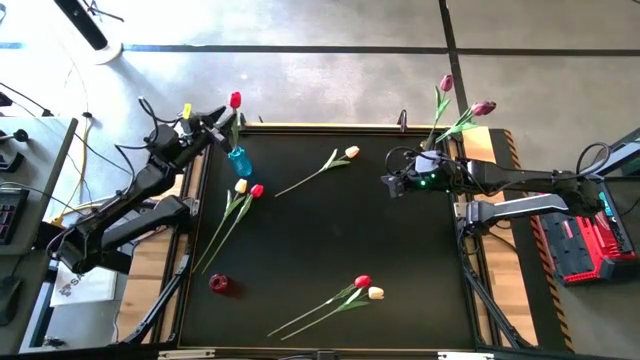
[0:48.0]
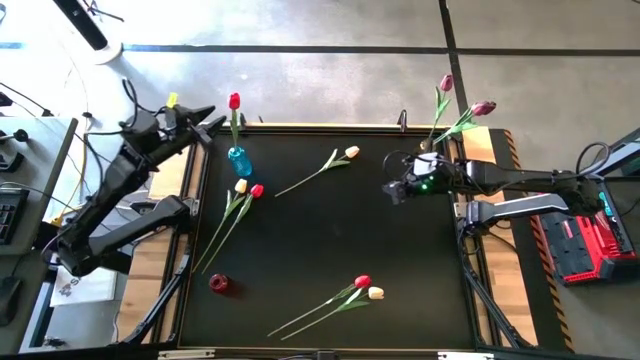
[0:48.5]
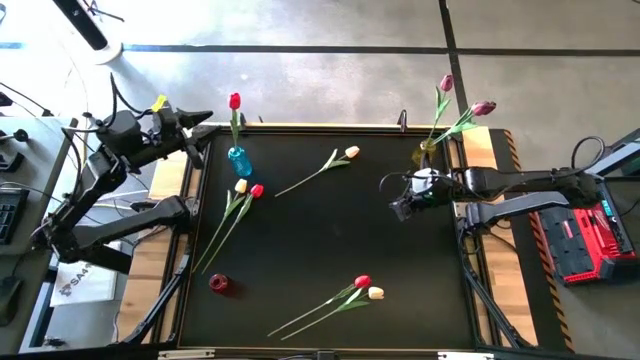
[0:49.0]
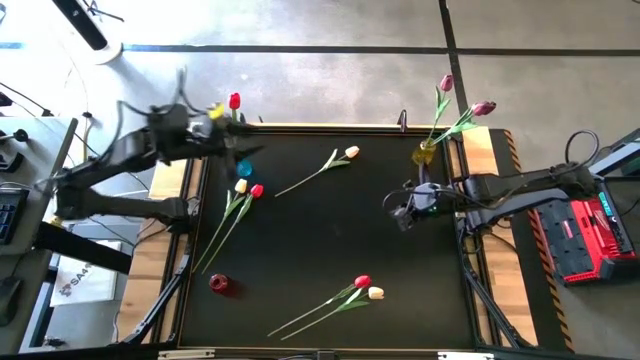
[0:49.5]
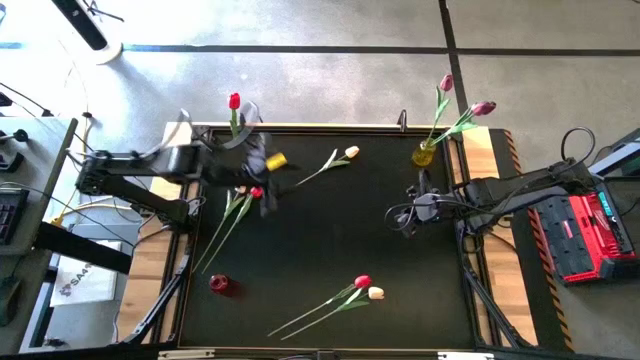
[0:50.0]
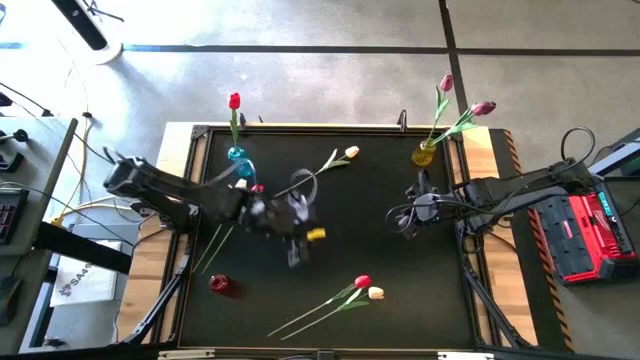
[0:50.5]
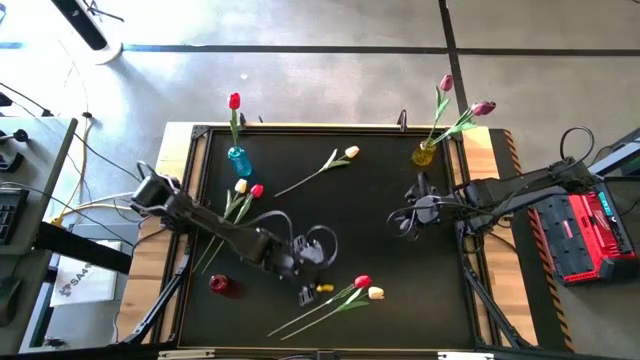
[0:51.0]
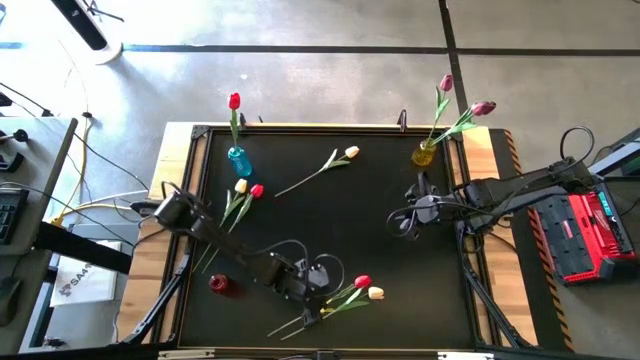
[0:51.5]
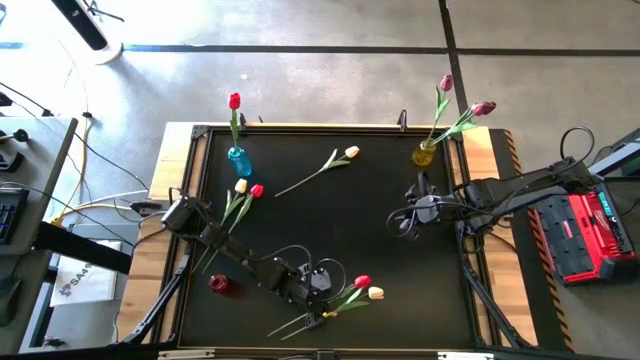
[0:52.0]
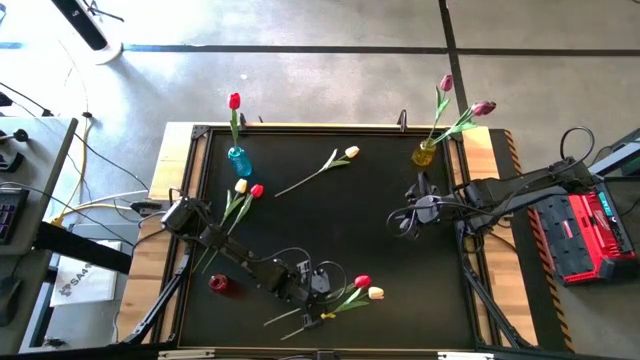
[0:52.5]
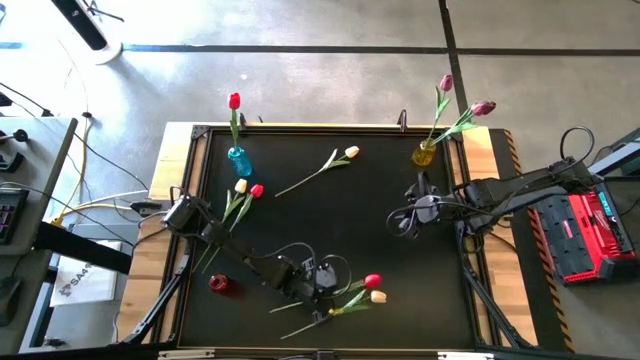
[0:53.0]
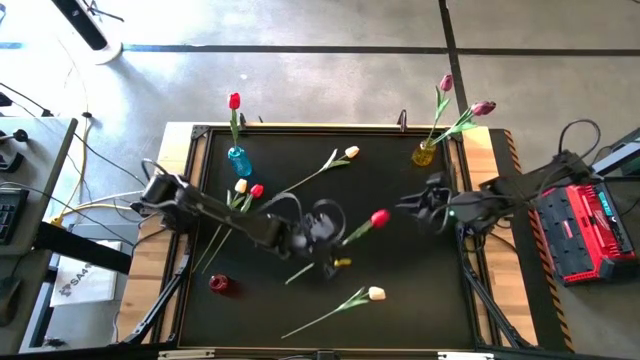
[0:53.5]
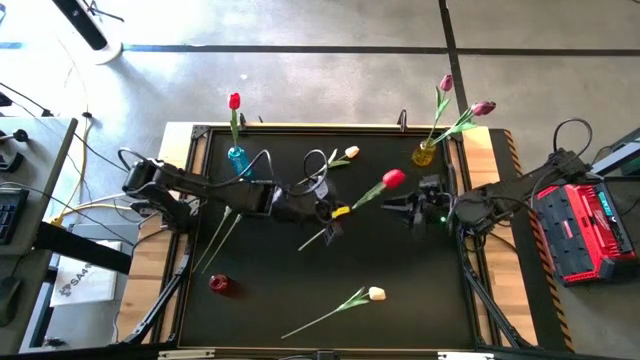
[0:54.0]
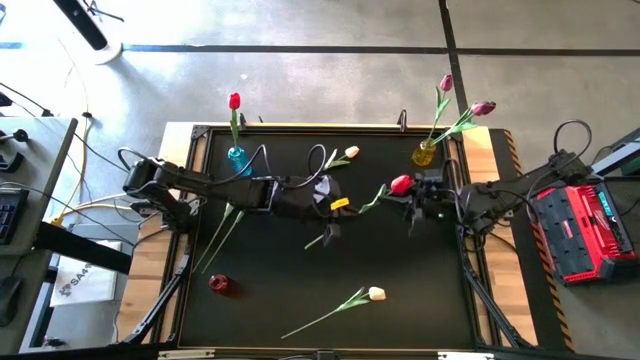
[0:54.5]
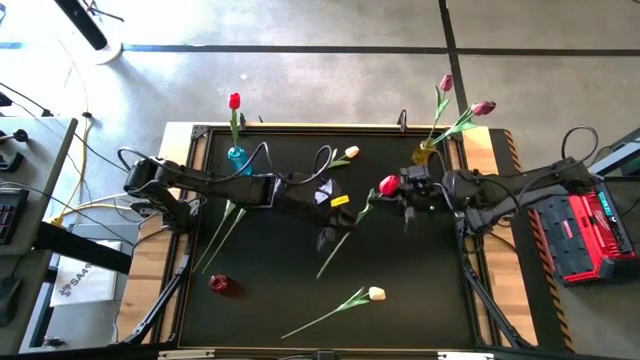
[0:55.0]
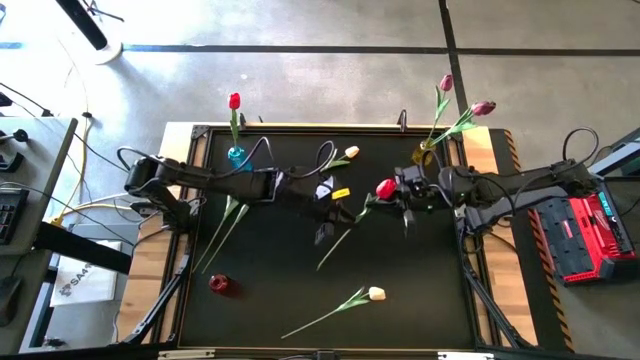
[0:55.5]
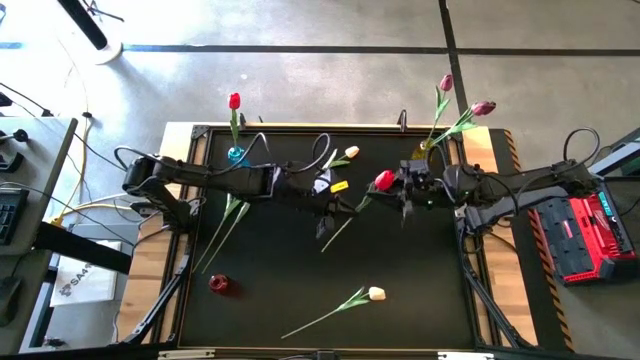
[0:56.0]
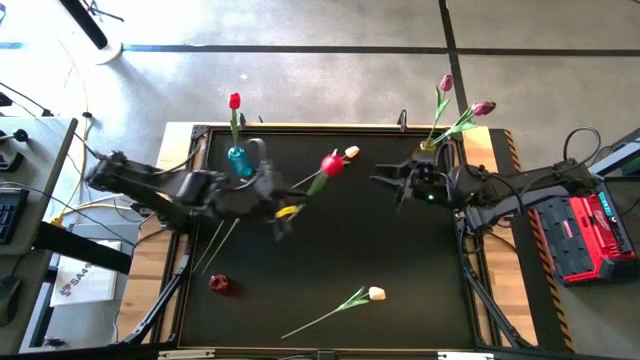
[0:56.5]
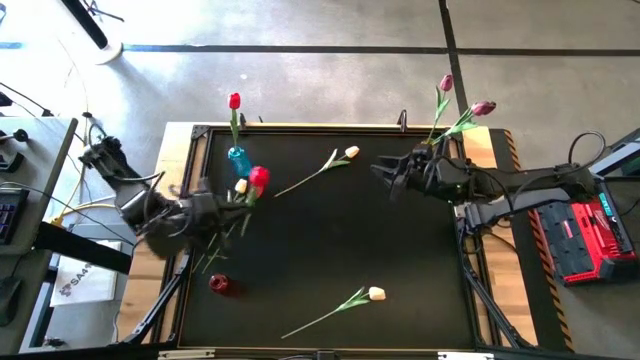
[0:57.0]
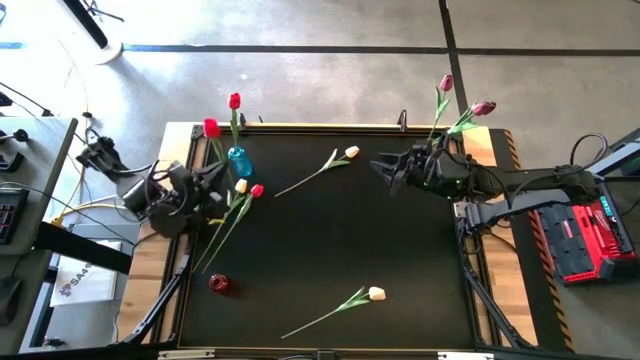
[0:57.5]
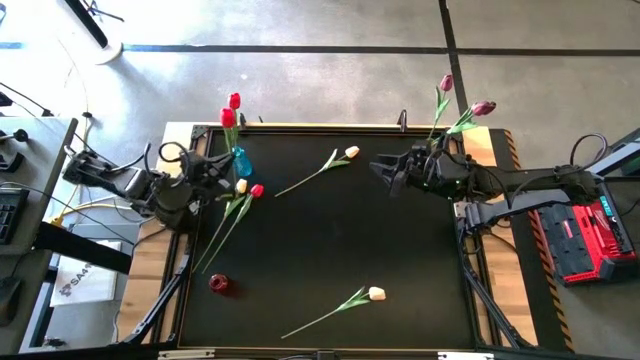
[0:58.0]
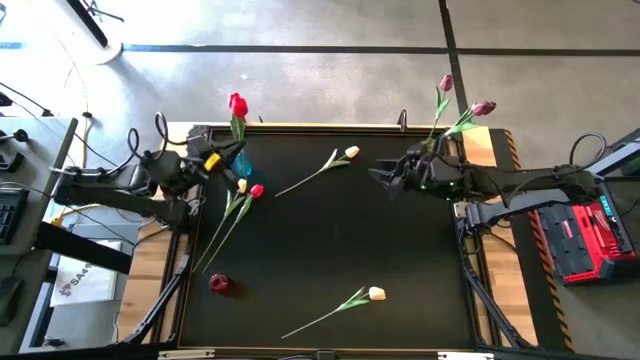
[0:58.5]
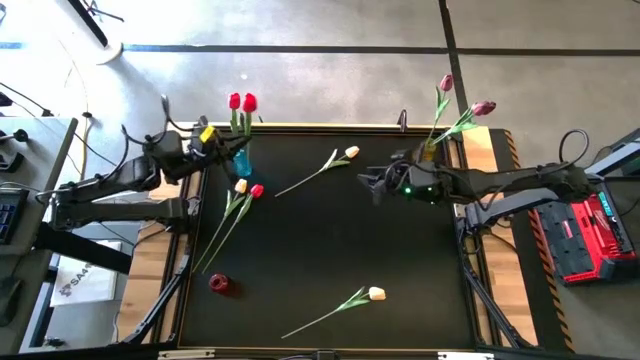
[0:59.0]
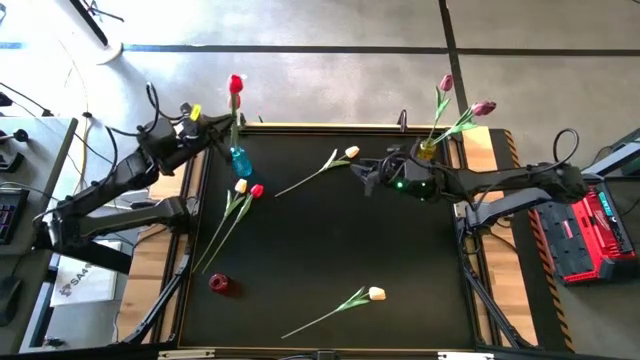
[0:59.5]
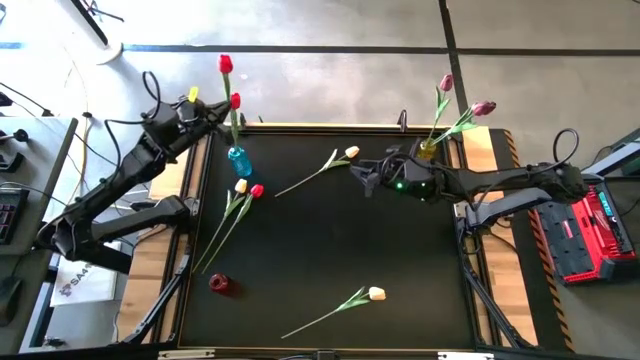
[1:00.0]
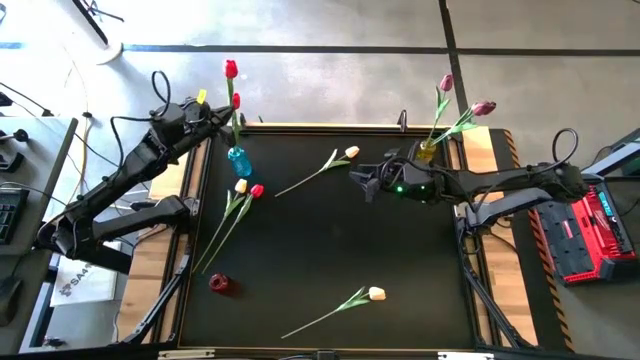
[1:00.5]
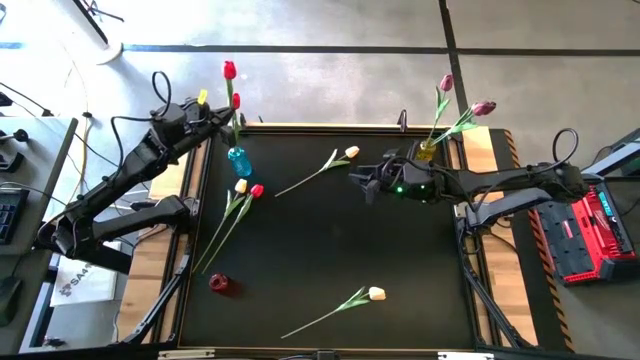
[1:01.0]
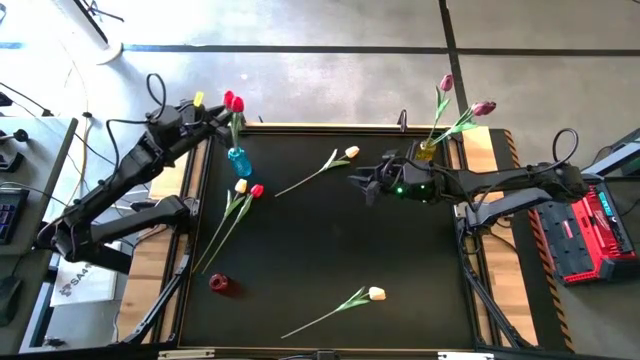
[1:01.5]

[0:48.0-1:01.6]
Task: Sort flowers into vase by color
Put the bottom light red flower into the blue vase

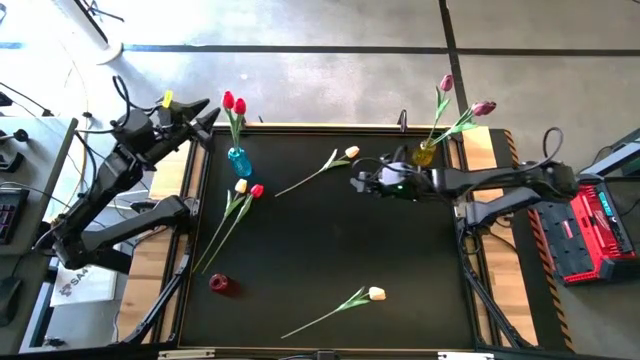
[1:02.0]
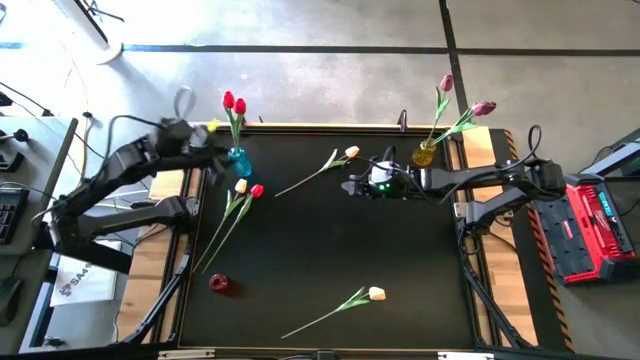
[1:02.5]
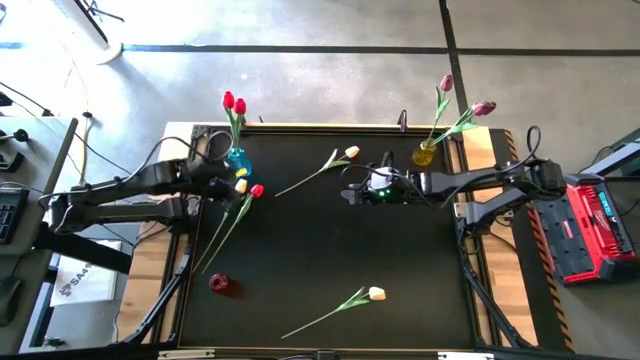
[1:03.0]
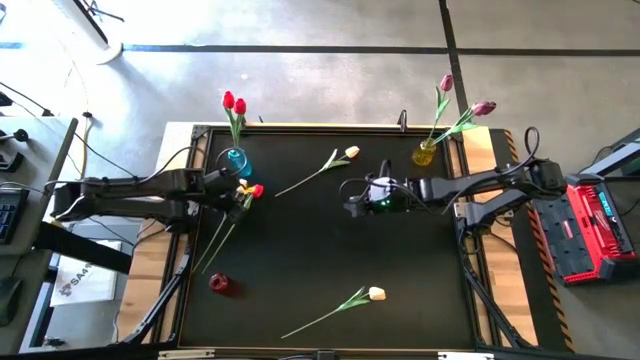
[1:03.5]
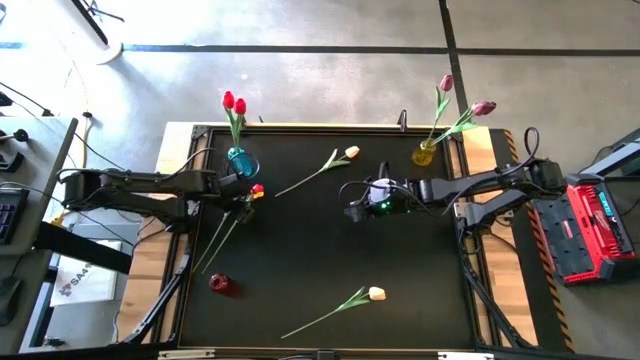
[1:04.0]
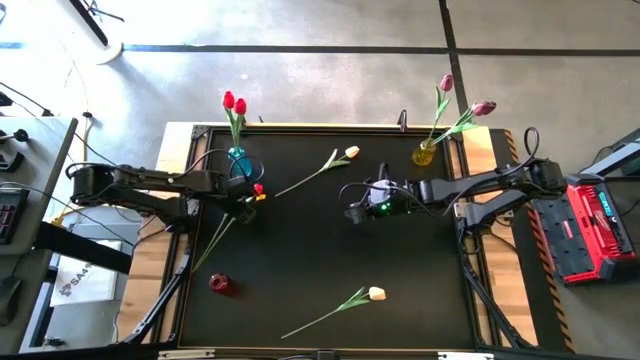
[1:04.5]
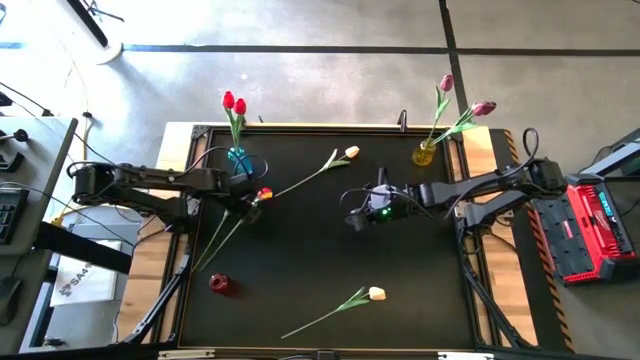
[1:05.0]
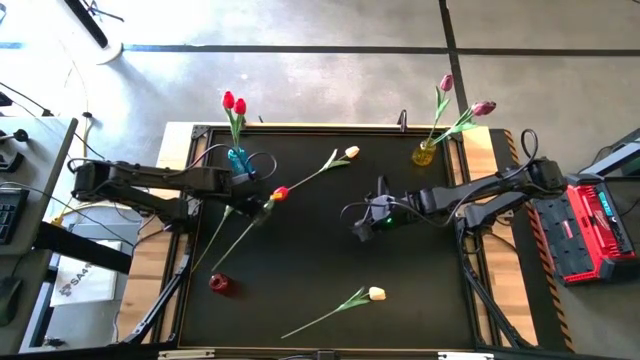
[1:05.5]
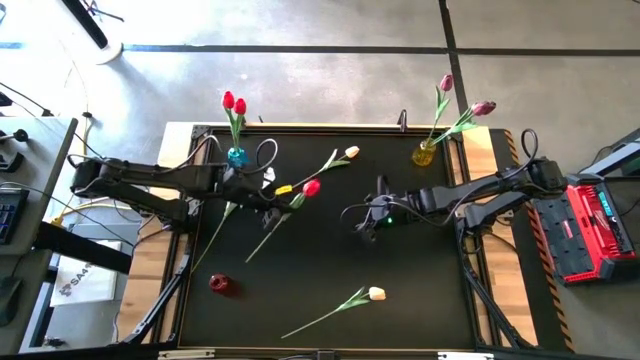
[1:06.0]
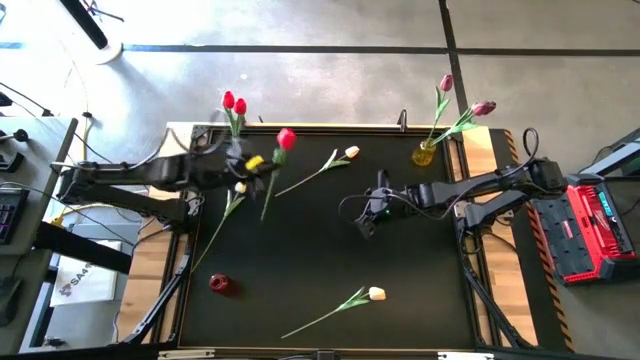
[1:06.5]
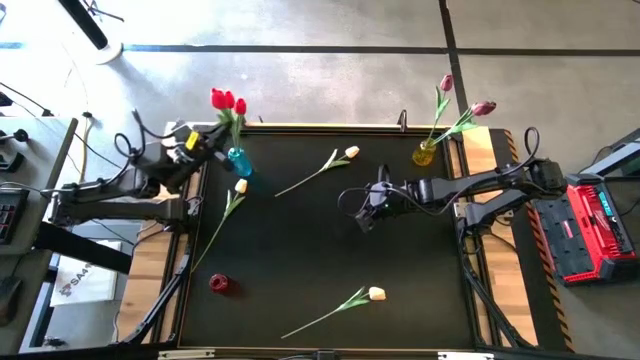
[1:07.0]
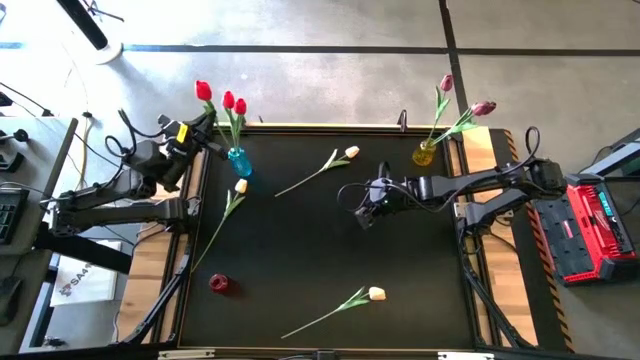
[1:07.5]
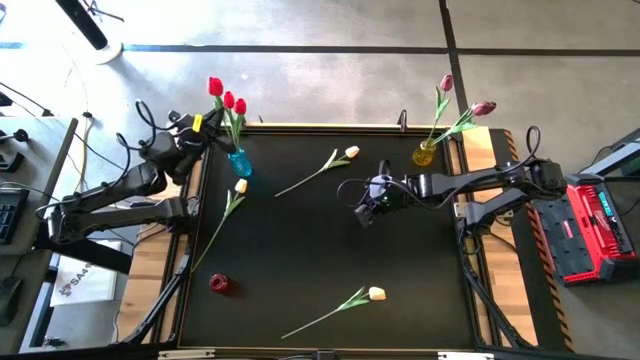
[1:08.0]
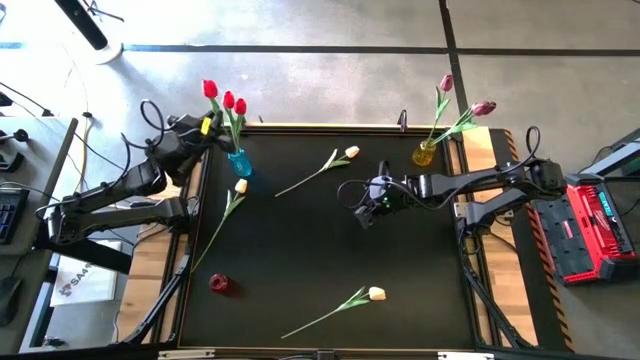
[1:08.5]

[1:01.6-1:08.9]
Put the light red flower into the blue vase

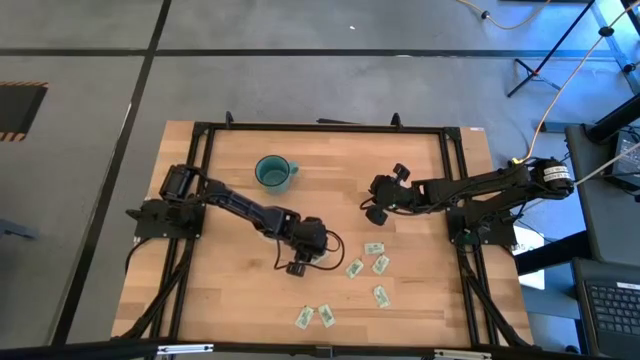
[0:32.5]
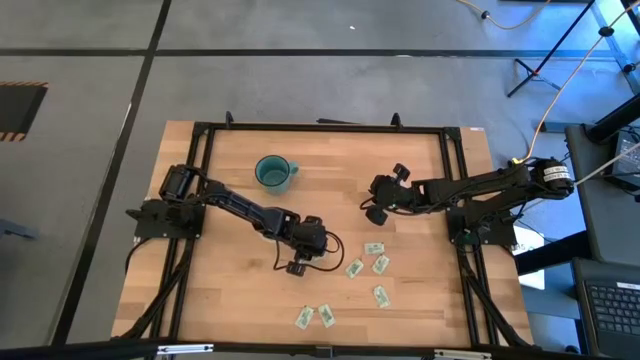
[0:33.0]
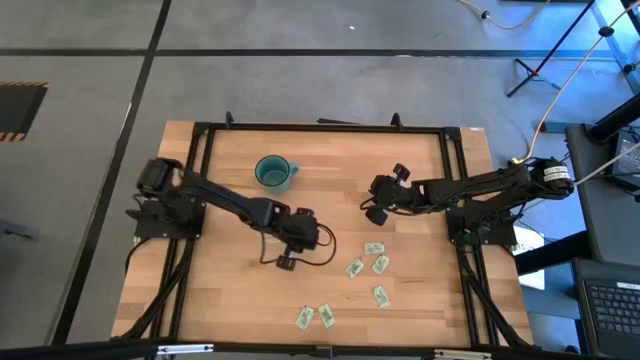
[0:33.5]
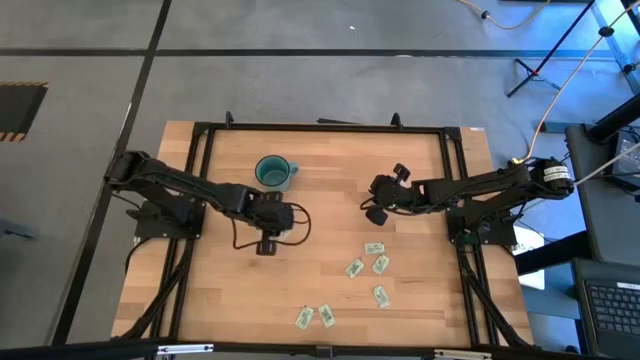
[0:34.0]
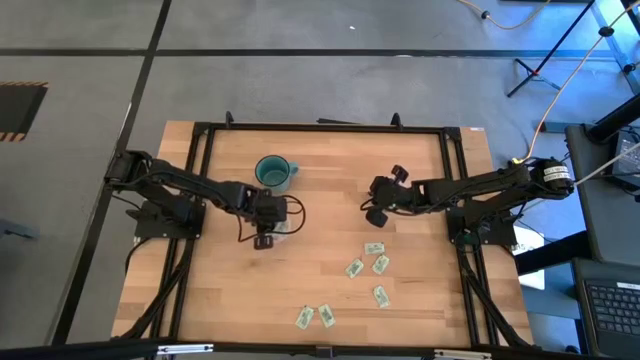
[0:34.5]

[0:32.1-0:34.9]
Task: Pick and place Stevia / Truvia into bins
Put the white stevia packet into the left transparent container
